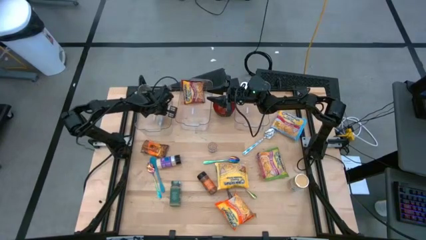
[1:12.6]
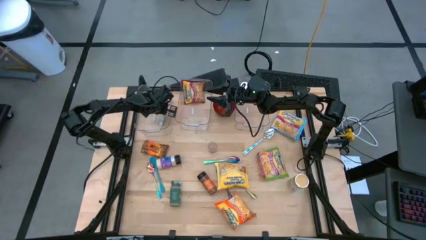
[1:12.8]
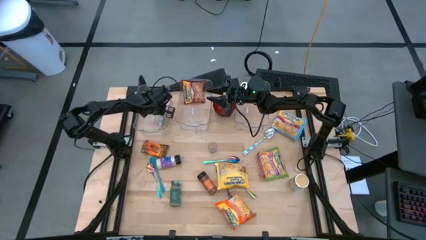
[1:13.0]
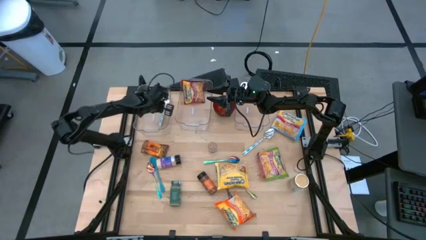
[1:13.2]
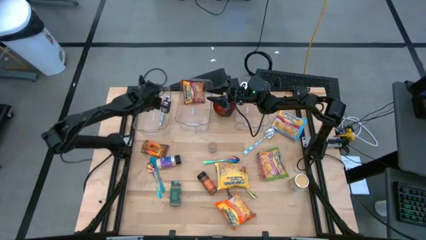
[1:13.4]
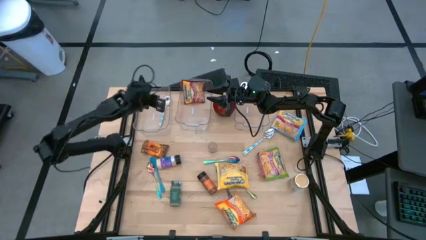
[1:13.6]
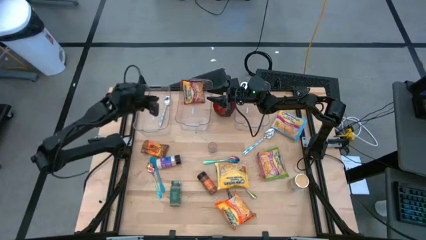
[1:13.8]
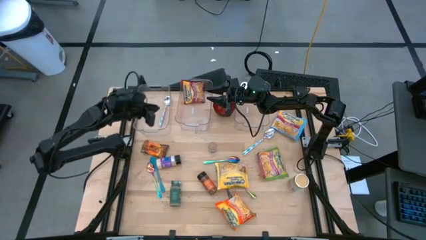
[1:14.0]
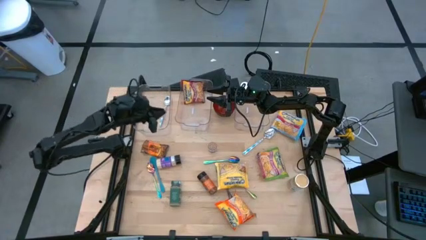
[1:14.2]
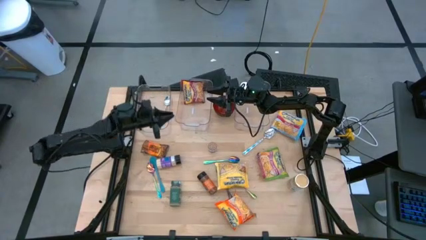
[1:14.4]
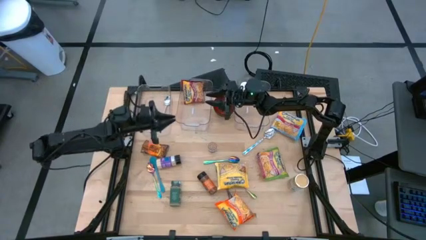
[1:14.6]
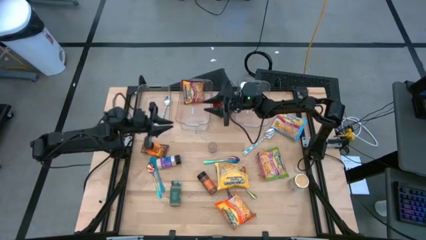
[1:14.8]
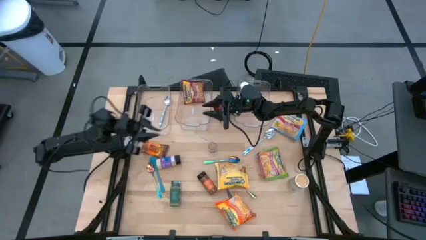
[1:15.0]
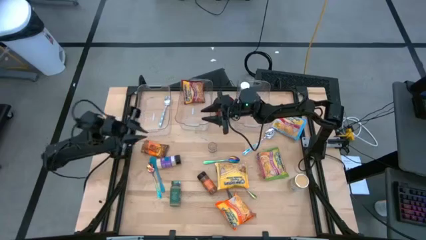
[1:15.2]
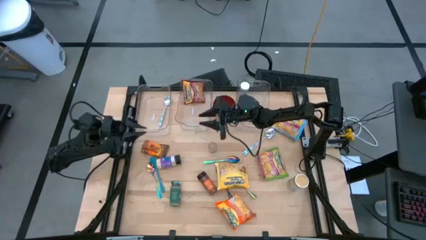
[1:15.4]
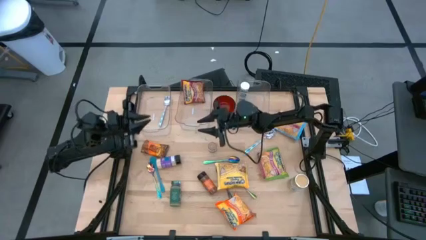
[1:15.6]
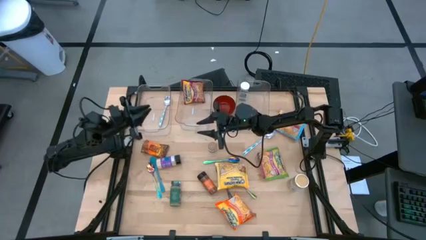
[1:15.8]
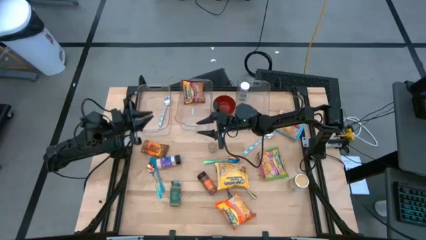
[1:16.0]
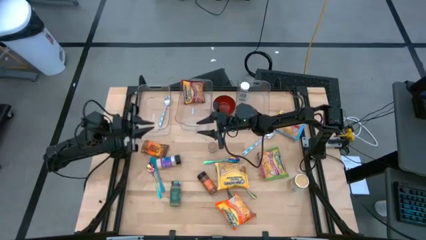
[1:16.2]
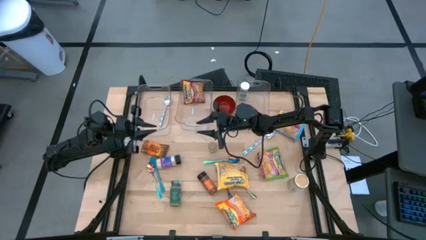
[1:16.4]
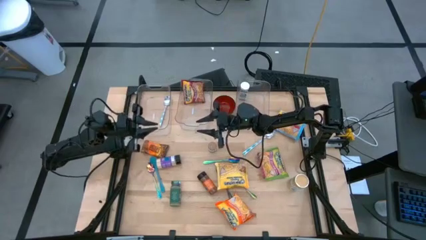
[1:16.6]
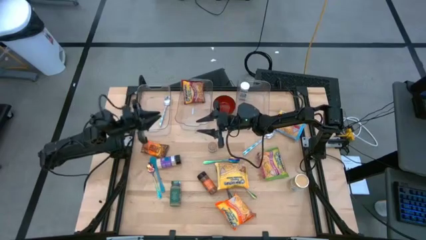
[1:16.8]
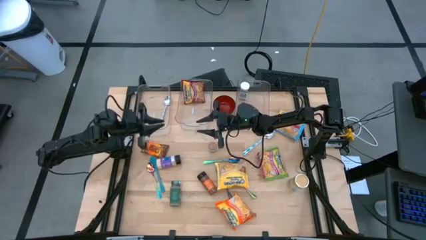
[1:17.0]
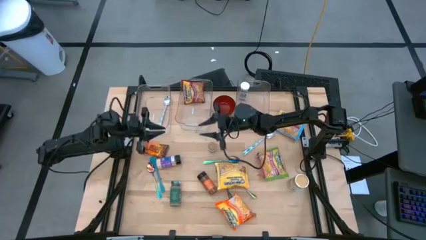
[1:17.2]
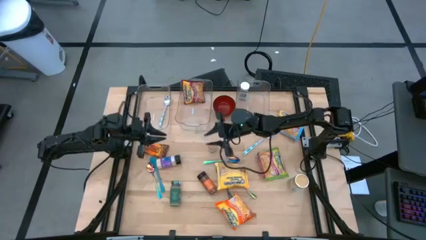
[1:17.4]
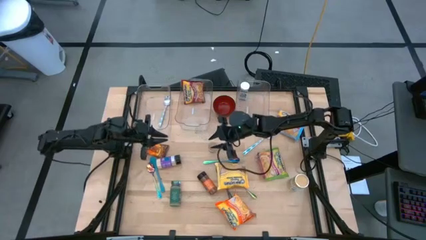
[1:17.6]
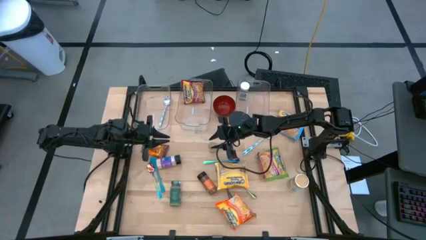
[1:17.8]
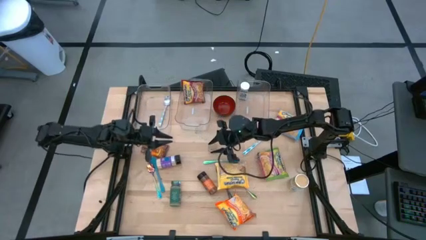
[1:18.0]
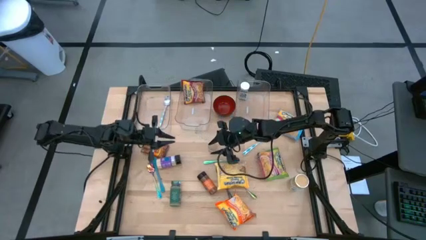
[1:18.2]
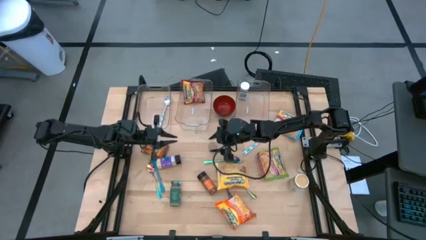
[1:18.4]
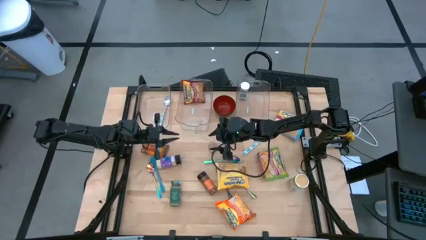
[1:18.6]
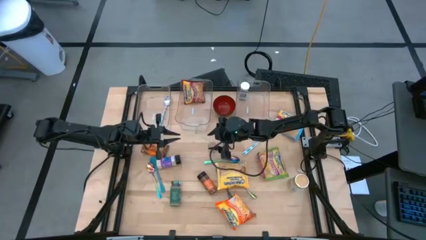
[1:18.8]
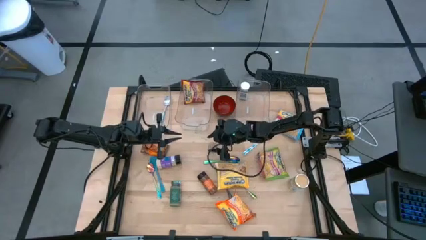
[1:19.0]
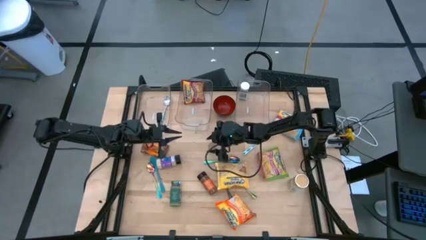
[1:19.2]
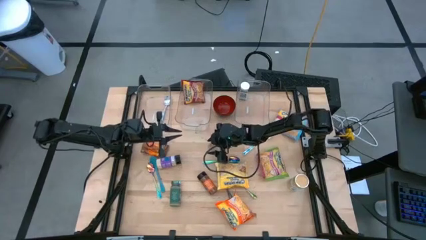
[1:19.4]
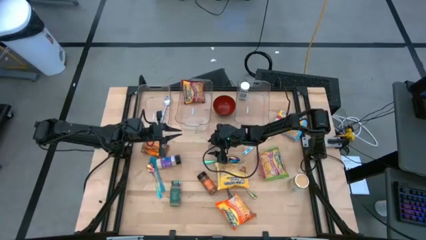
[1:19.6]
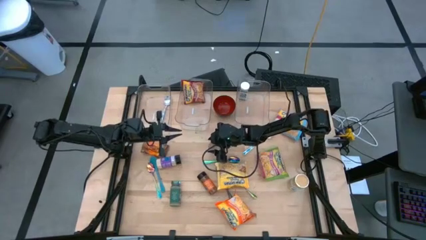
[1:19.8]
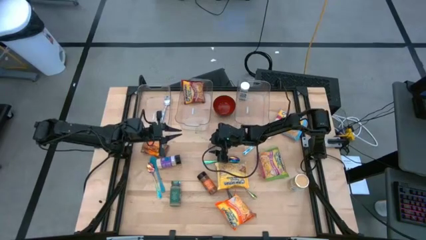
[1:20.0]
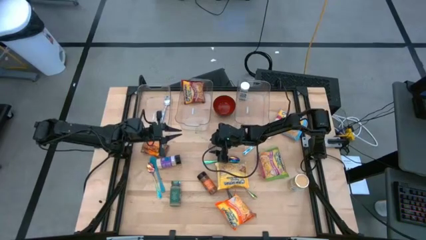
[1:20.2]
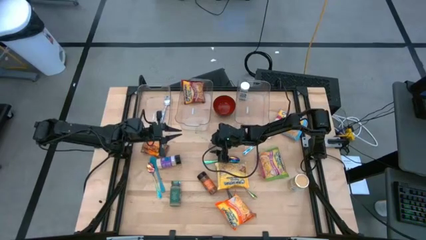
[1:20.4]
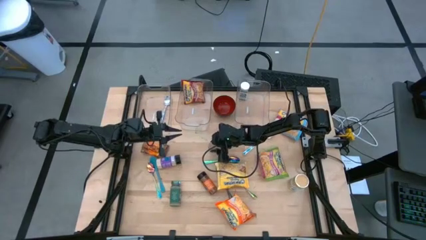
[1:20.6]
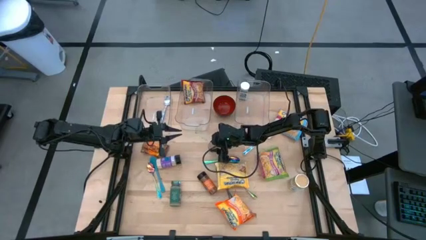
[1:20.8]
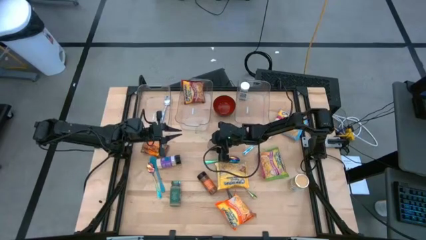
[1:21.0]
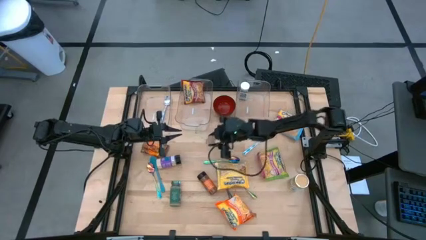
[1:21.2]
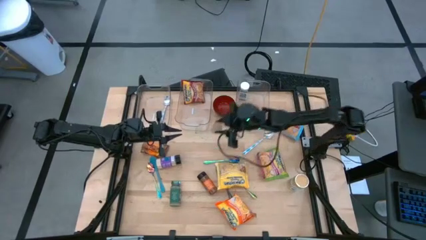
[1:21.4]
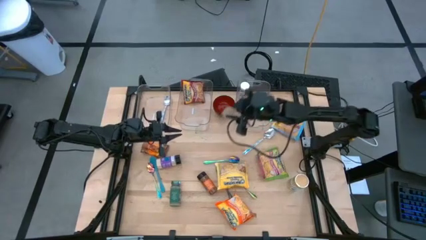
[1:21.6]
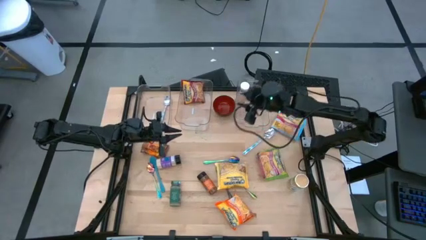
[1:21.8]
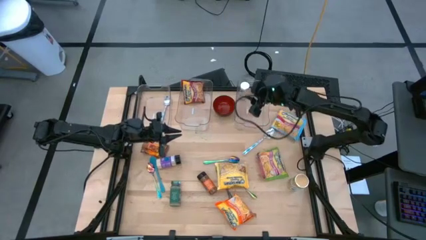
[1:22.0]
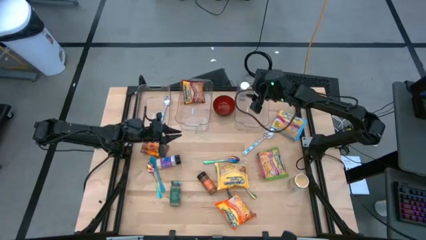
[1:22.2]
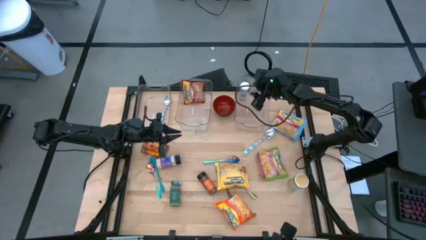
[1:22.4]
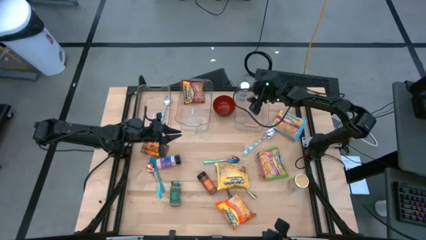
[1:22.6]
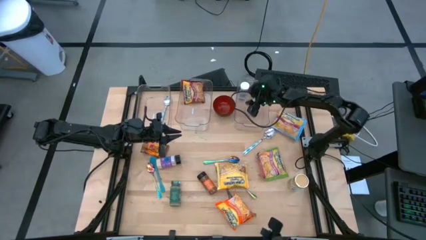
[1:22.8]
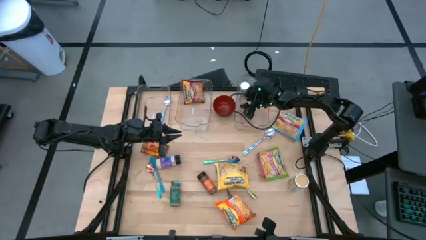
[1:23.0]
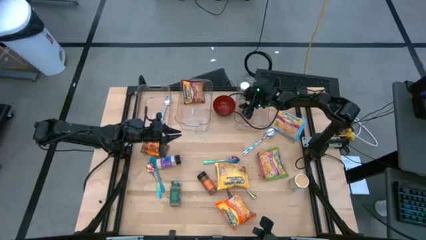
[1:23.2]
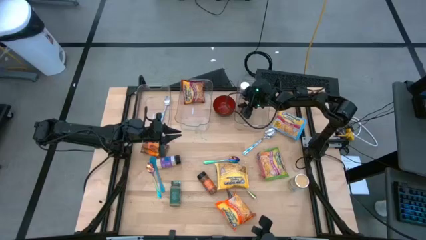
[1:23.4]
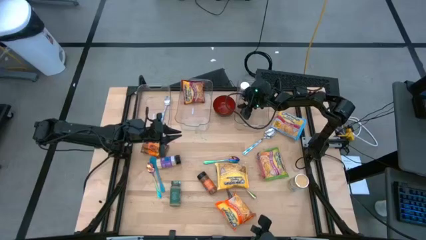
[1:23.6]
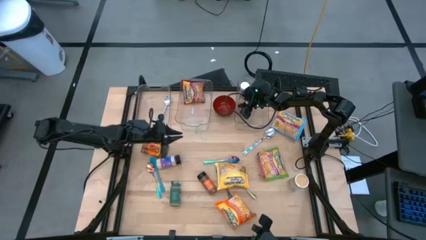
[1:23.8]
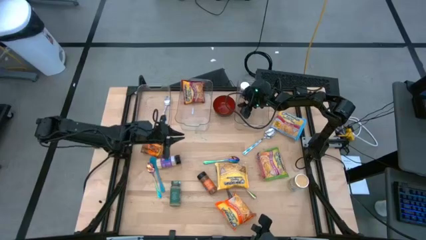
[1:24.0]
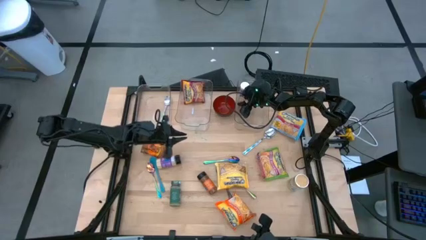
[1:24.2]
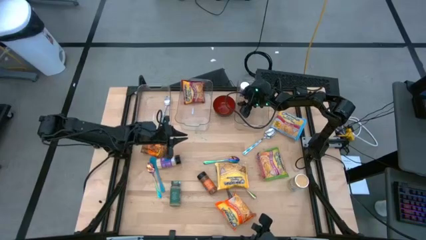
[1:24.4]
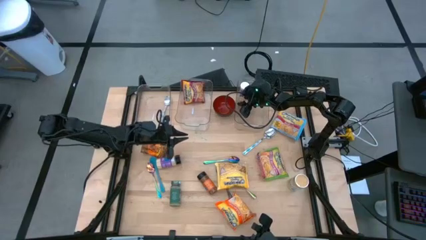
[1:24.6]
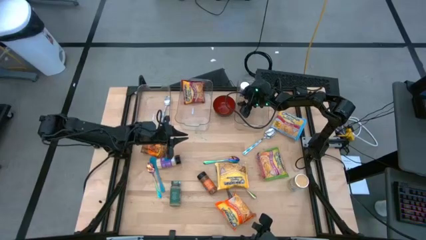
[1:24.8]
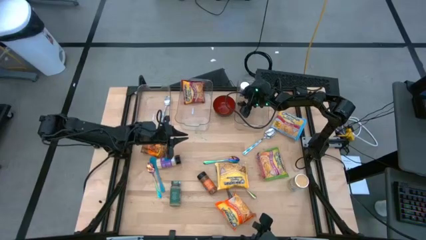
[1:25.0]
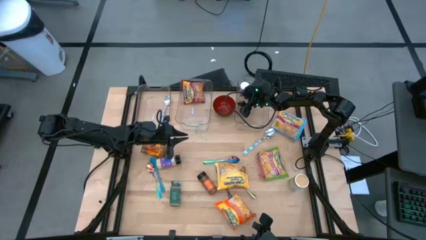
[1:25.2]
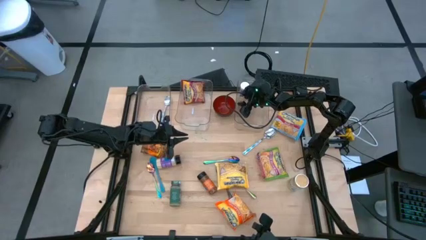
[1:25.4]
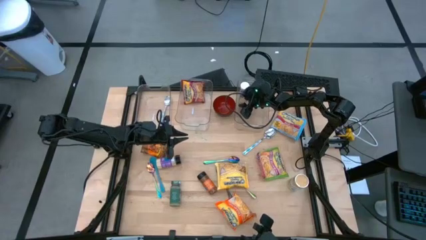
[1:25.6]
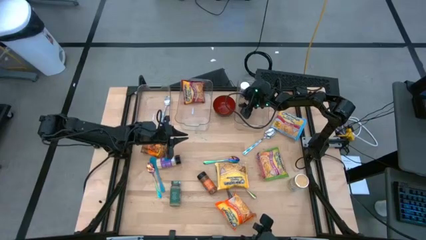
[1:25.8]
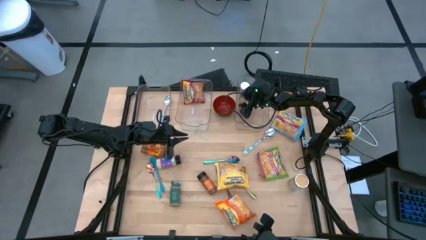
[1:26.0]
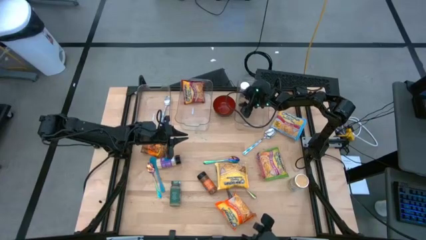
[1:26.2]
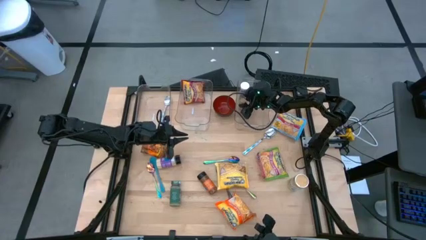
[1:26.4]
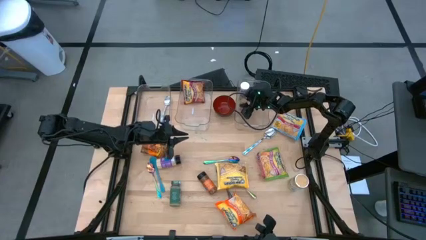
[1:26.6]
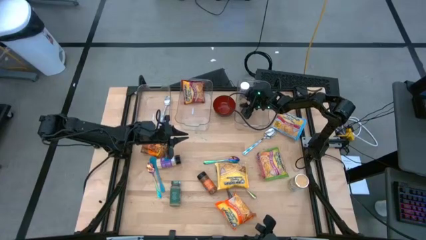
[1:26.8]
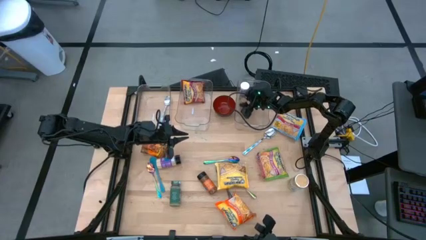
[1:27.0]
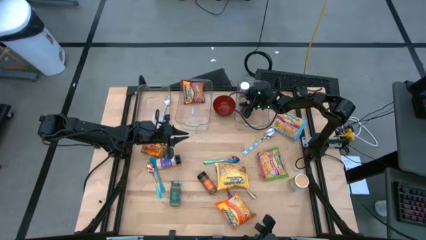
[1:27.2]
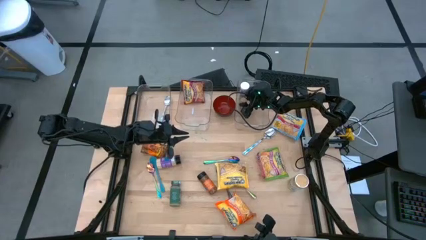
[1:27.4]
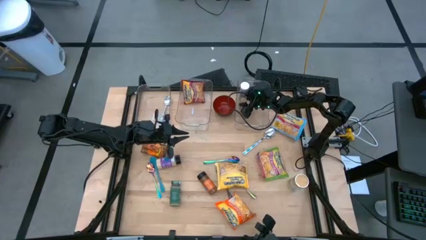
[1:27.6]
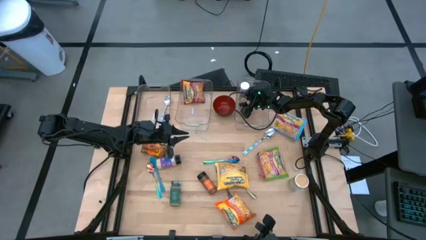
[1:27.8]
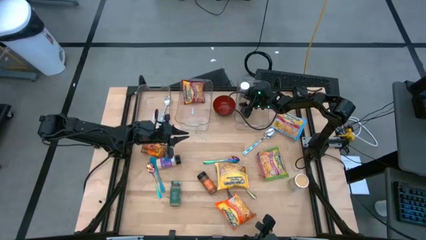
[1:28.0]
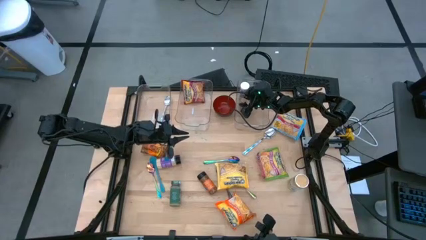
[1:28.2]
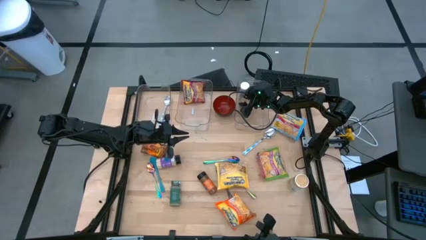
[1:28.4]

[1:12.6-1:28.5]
Task: Pick & Place Food Item
Put the brown seasoning bottle into the right transparent bin
